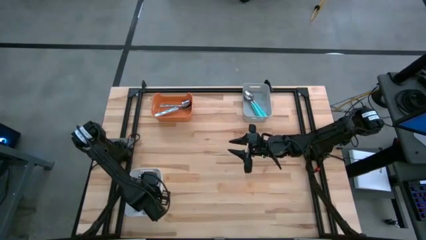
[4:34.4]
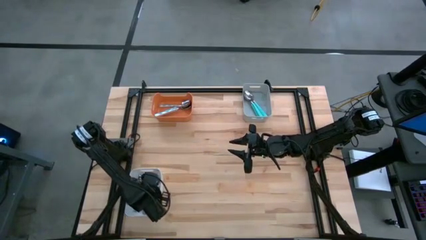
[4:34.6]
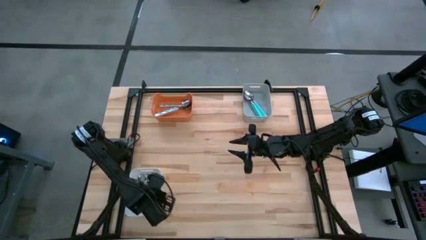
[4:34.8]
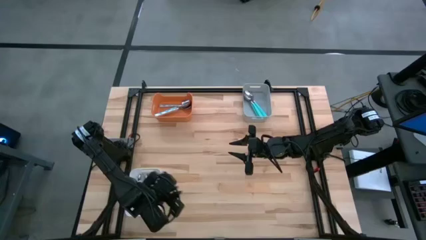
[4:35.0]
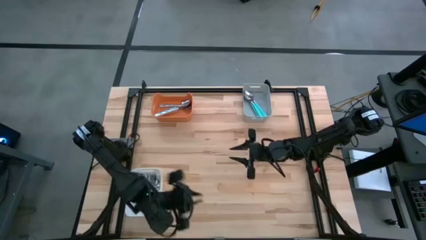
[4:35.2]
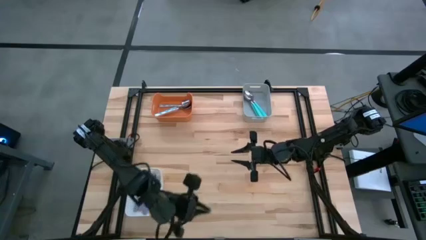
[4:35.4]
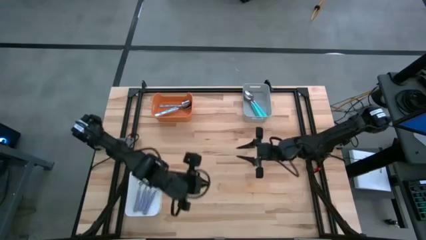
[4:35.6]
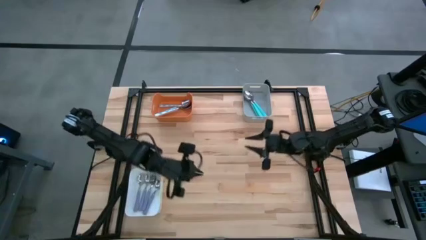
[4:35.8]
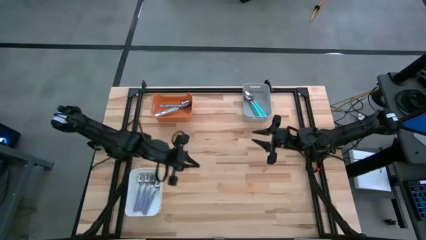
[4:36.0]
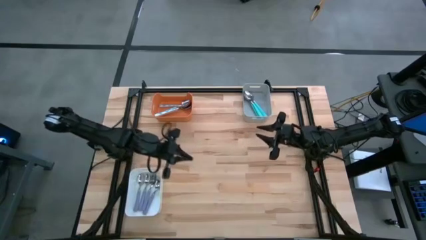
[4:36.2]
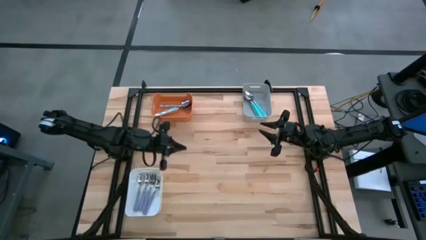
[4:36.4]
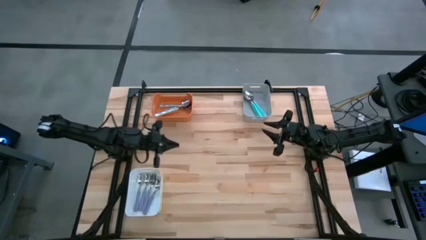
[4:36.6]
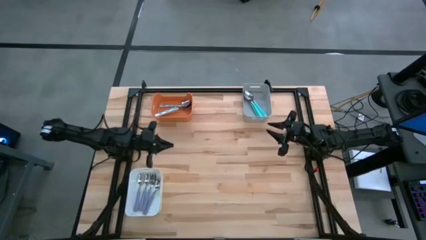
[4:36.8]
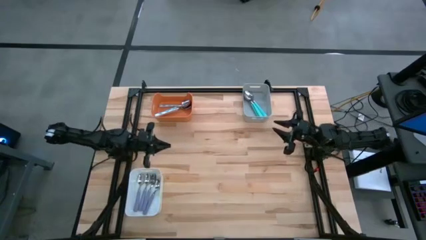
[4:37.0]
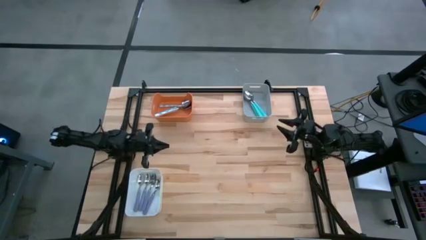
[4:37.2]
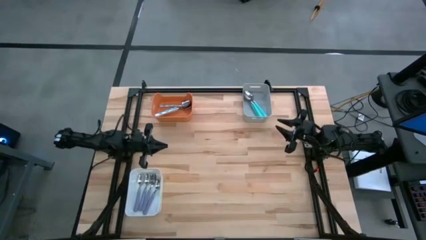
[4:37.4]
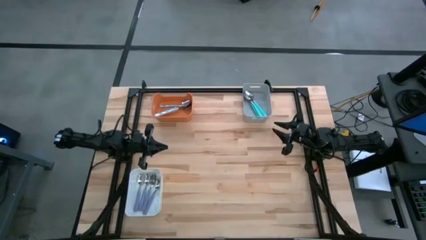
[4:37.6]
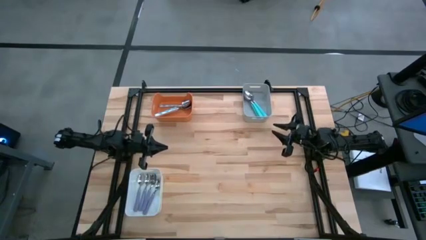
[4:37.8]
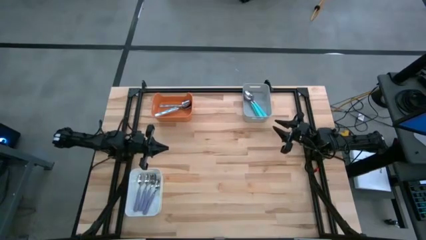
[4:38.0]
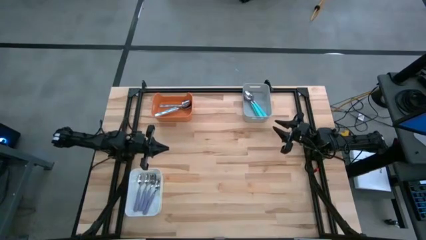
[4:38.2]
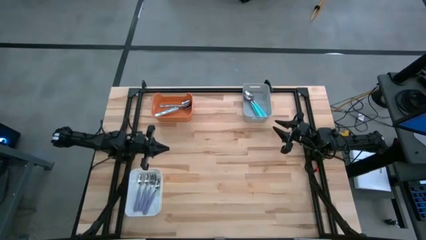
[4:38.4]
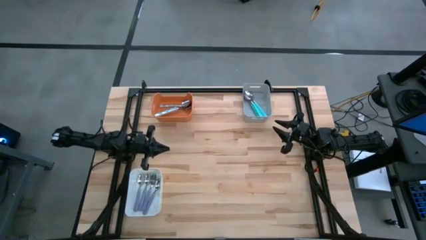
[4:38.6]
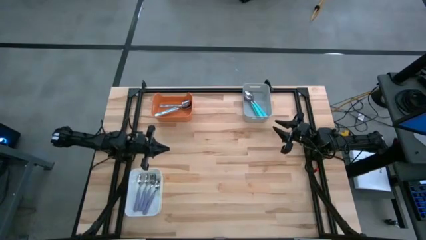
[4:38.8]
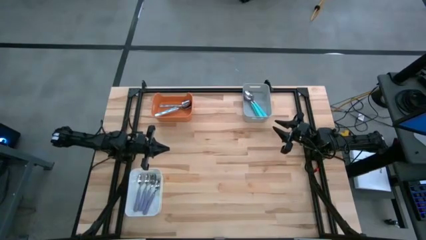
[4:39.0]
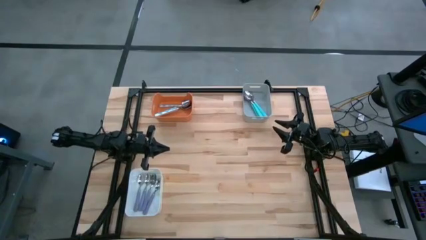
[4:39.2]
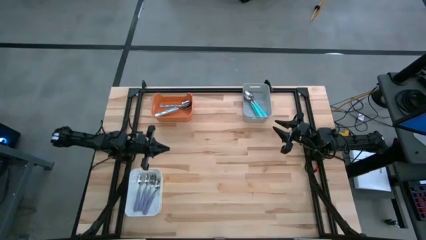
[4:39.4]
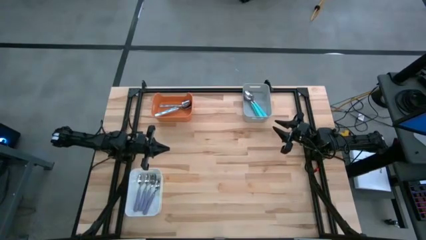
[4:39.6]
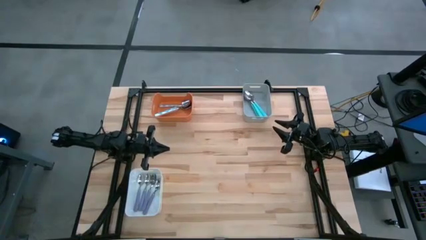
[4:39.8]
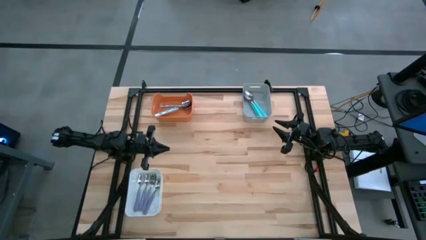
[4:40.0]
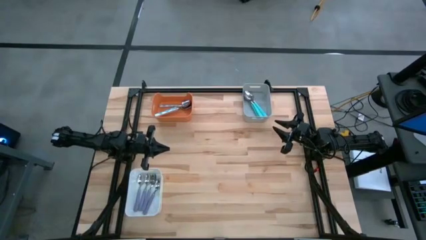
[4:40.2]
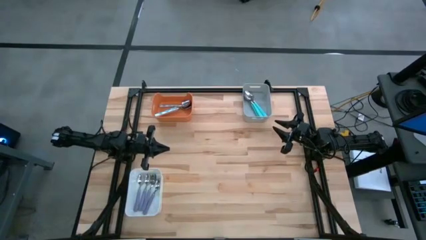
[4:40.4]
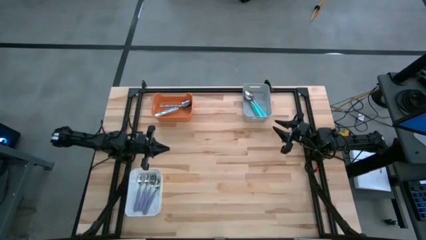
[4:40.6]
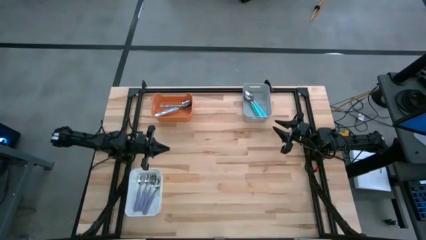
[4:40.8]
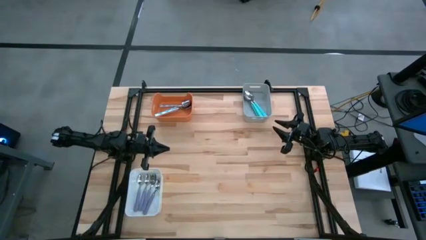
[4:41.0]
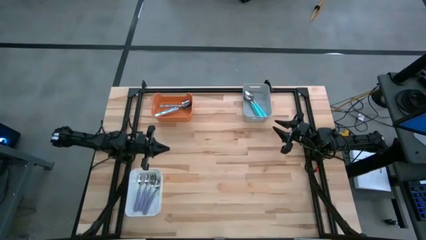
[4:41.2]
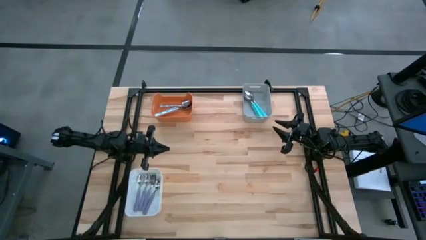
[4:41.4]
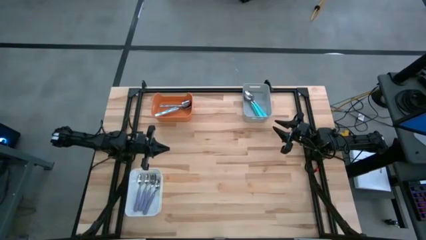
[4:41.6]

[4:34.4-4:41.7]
Task: Sort silverware by color (type)
Return to home position

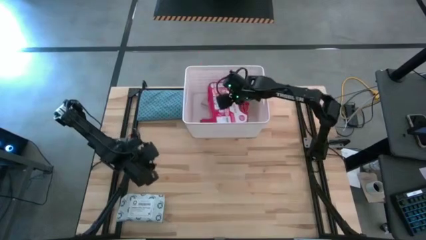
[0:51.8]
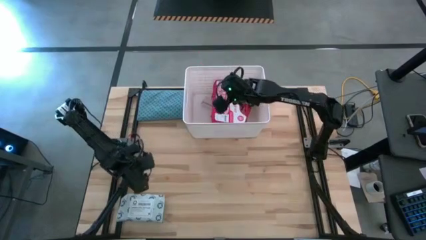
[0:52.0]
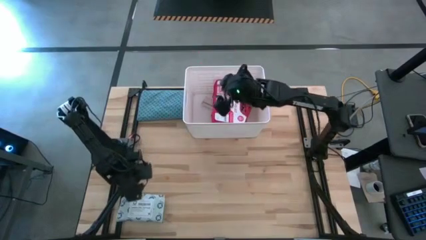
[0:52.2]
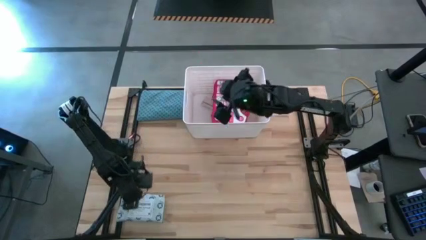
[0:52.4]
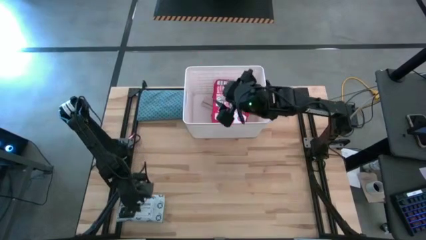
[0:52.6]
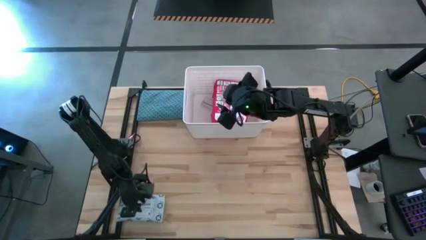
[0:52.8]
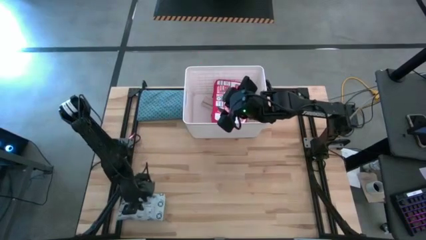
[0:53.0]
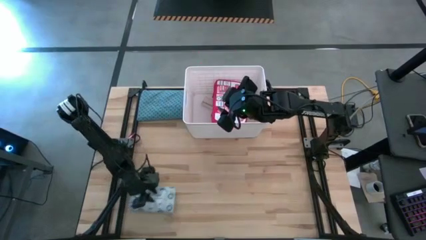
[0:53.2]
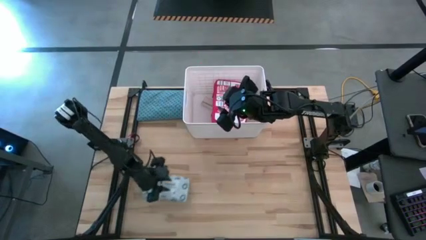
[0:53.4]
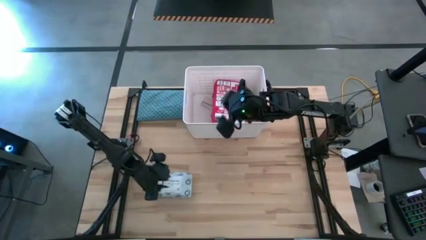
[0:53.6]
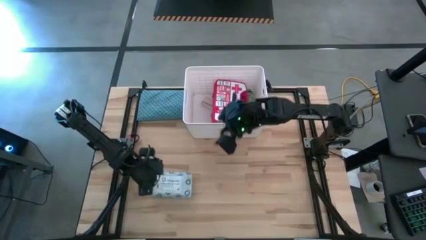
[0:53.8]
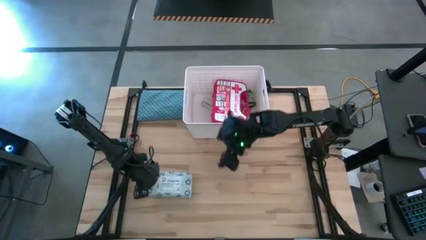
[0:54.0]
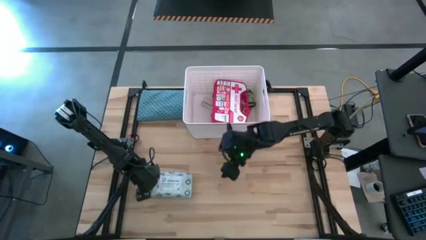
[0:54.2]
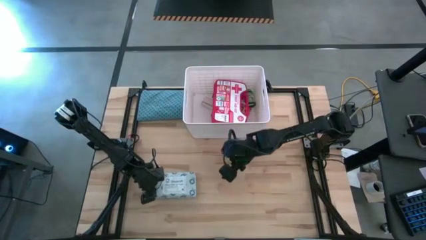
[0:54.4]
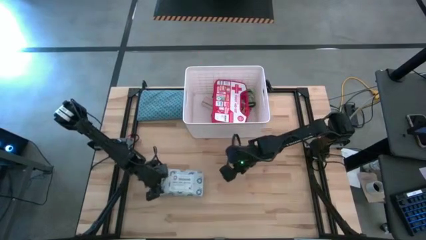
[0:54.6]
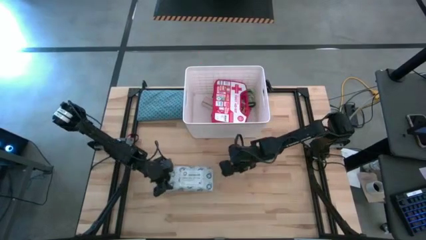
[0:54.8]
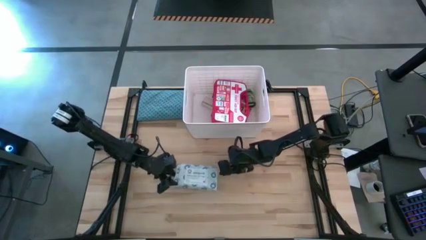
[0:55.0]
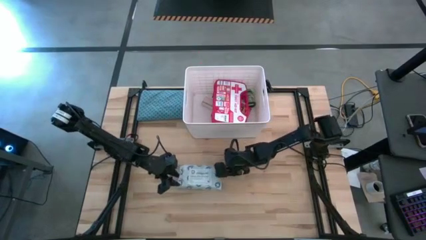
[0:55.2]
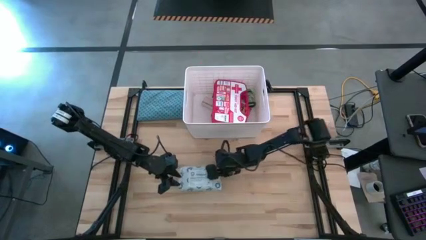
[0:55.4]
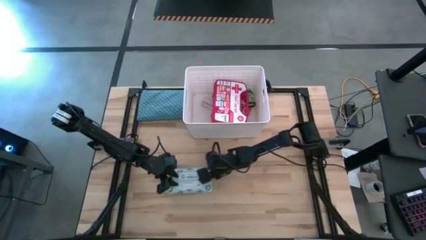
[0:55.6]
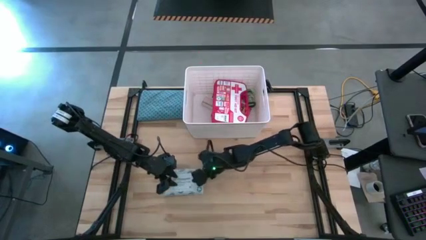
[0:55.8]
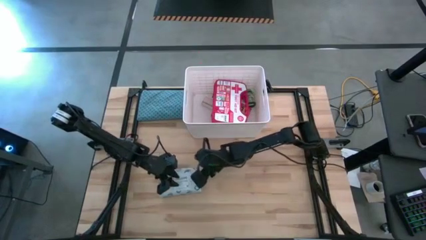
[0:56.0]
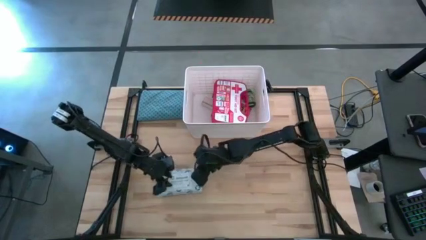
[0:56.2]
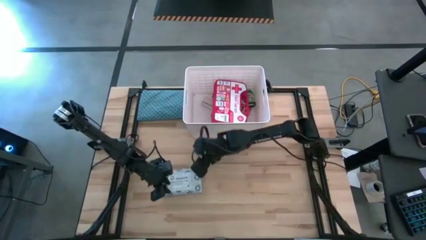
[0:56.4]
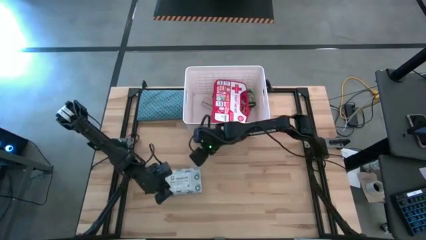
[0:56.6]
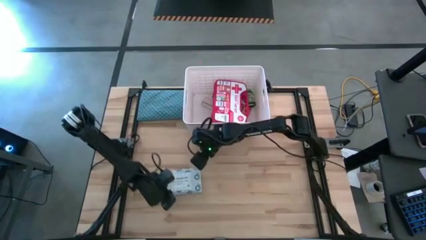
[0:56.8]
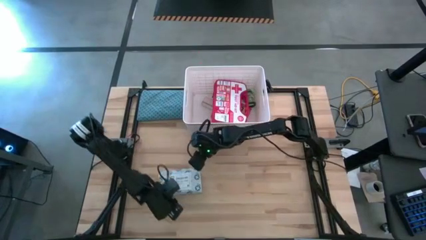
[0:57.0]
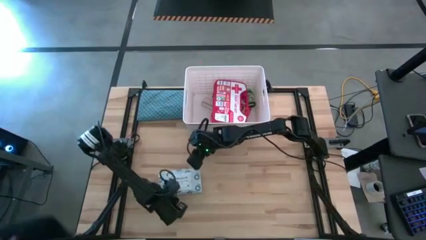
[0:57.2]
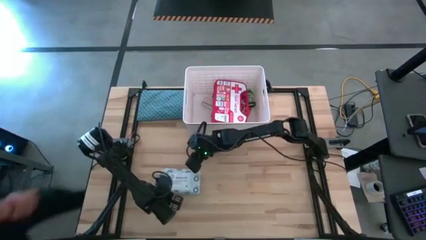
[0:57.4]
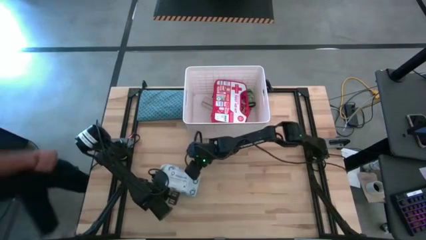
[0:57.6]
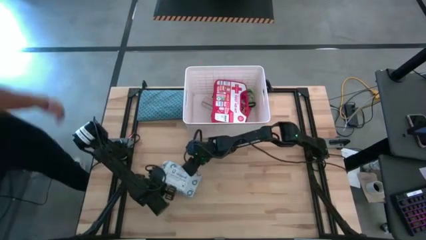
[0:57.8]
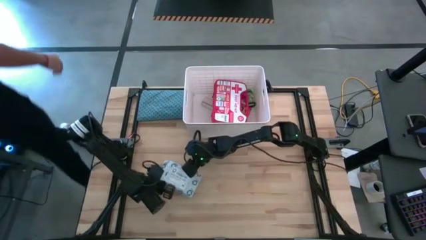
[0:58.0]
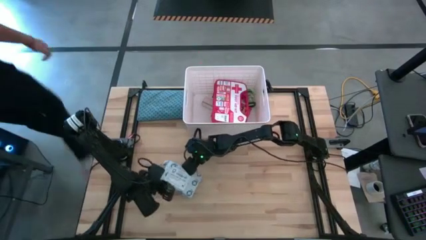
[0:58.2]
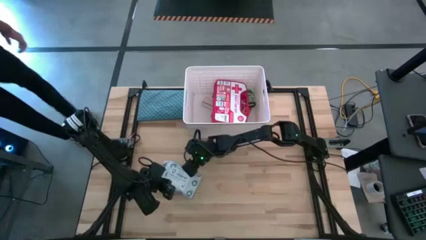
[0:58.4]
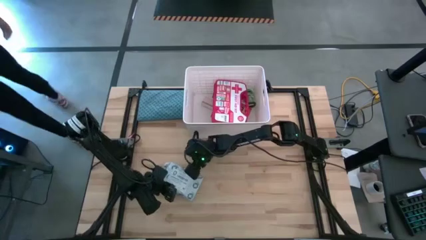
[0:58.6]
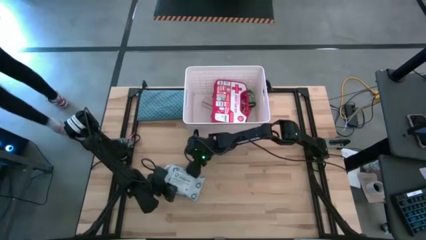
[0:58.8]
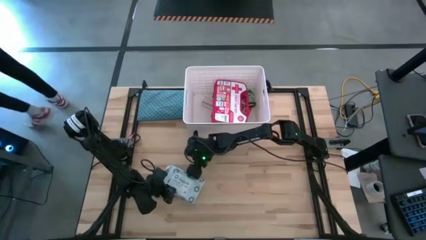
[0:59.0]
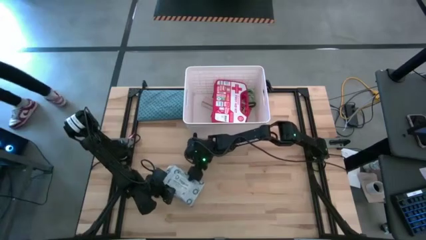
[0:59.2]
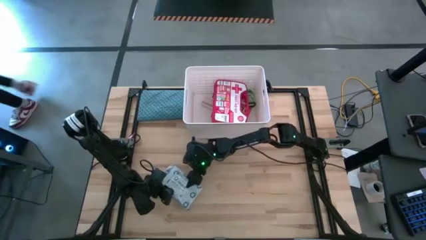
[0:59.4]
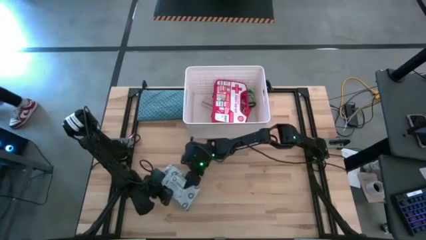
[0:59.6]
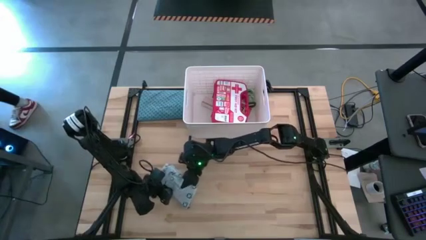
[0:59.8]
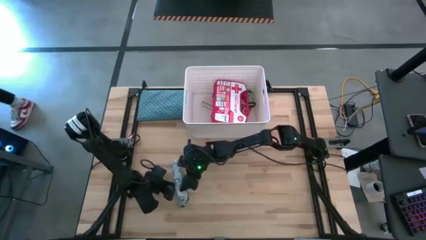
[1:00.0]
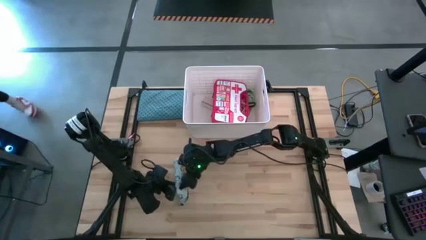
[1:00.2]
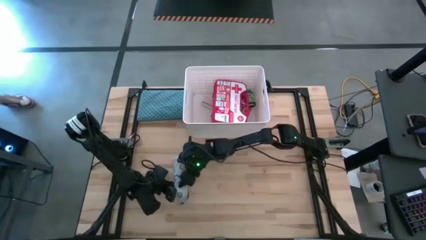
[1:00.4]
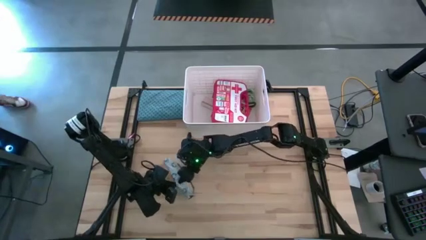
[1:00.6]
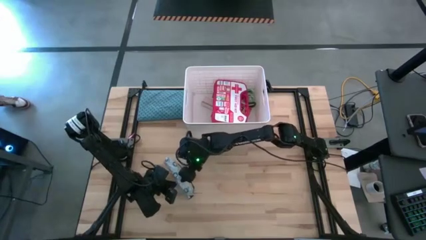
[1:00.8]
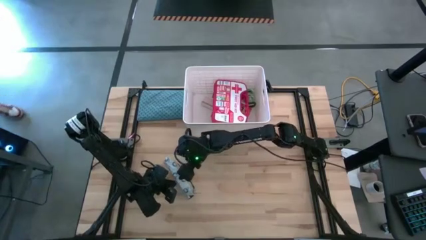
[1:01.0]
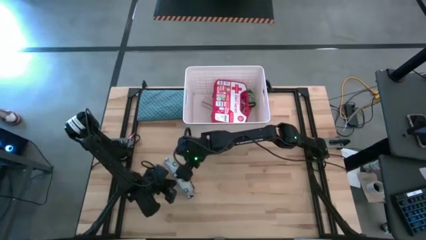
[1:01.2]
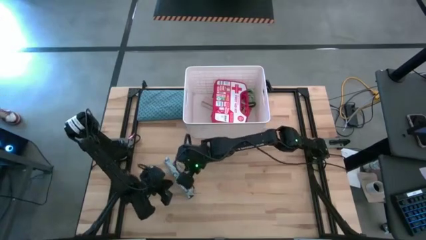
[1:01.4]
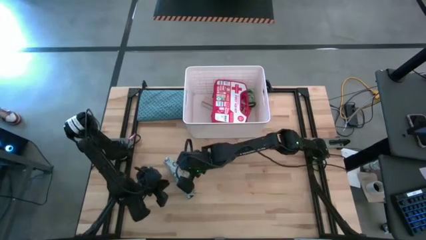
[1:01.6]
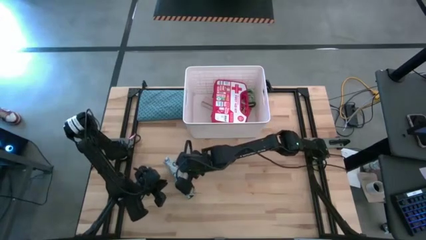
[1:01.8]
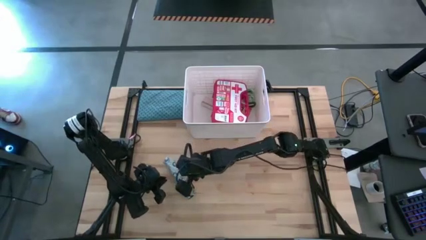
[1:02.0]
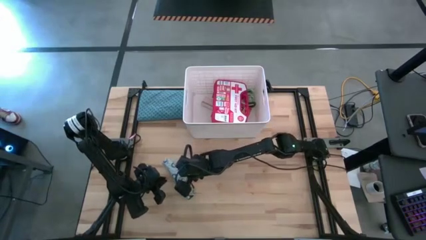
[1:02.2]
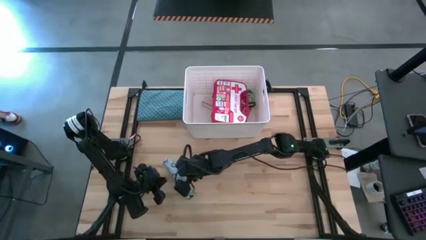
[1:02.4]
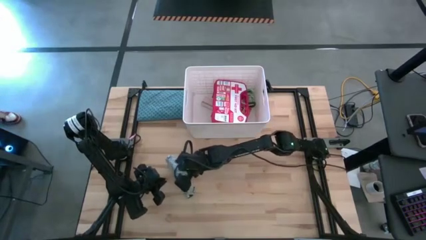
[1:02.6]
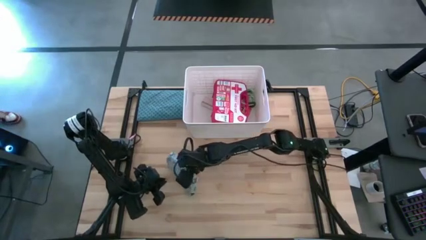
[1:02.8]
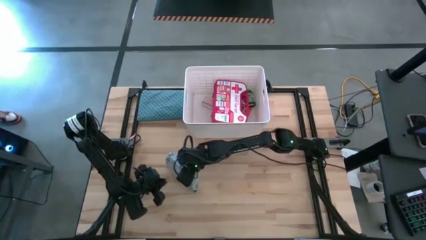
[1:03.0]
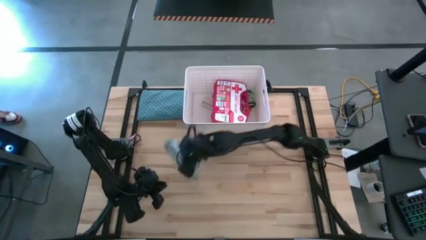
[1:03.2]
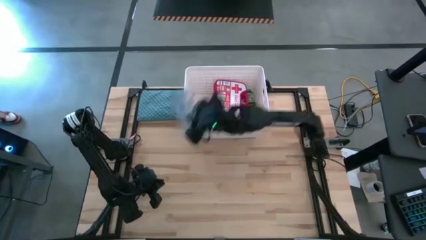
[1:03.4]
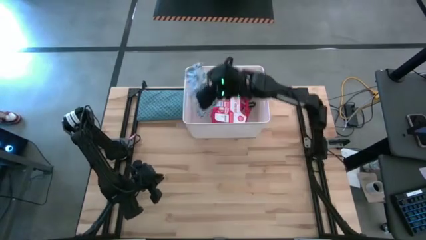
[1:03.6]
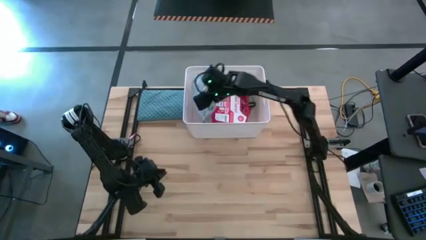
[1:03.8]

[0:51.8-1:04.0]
Task: Pick & place medical supplies in basket/bin
Put the white mailer bag in the white bin
